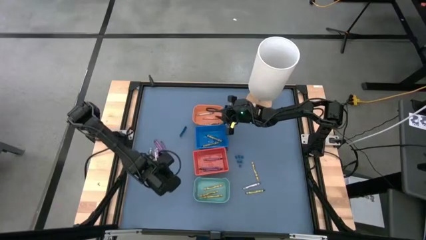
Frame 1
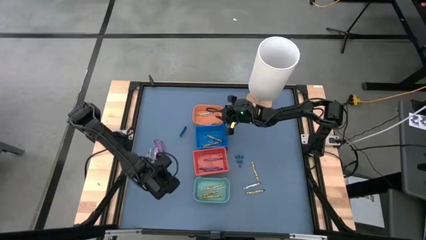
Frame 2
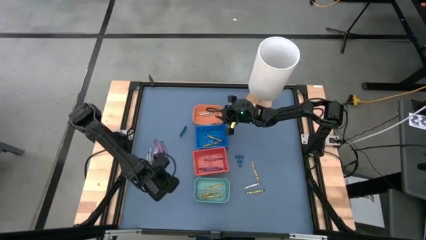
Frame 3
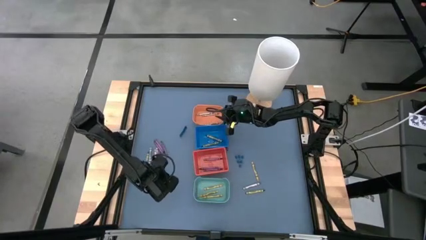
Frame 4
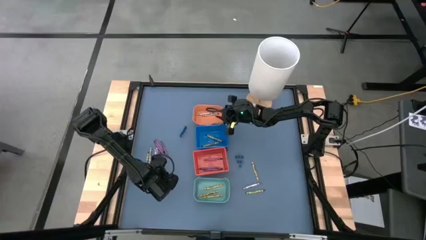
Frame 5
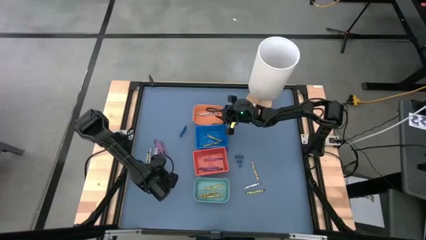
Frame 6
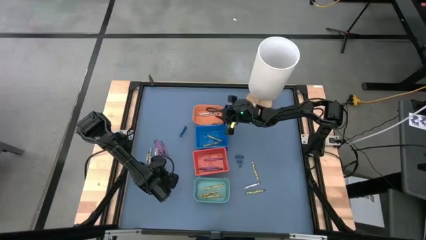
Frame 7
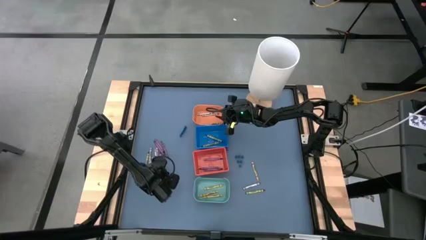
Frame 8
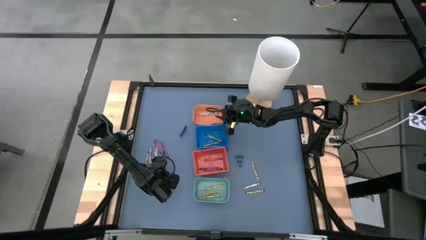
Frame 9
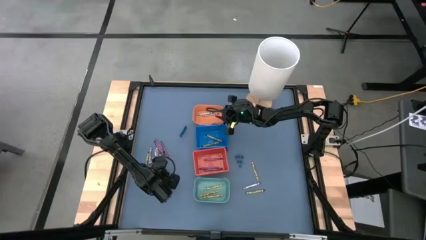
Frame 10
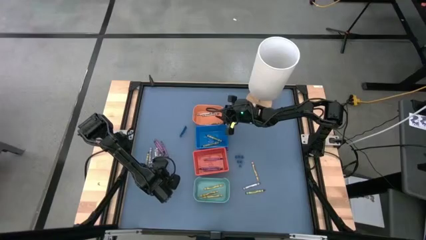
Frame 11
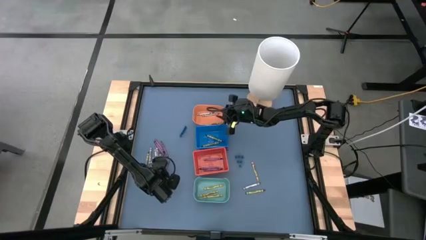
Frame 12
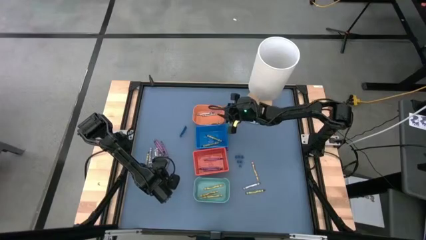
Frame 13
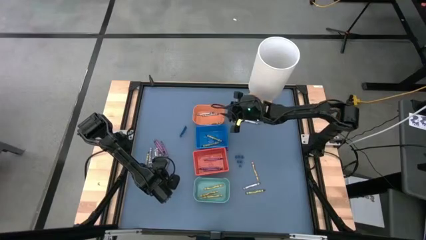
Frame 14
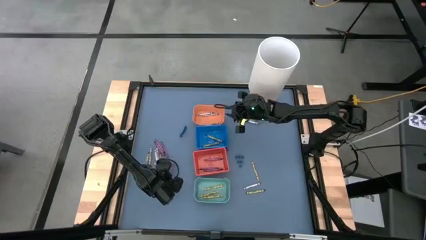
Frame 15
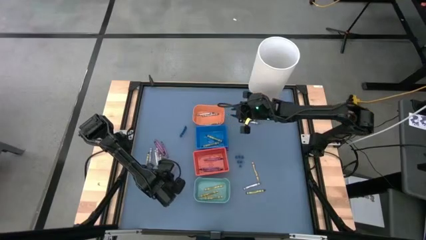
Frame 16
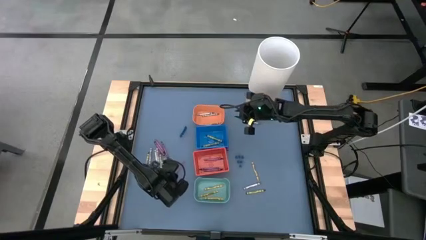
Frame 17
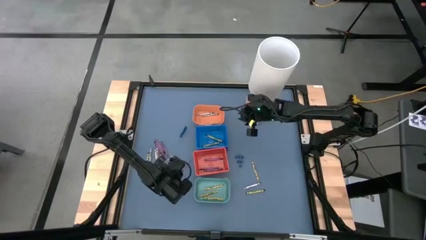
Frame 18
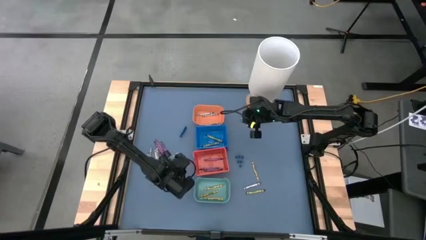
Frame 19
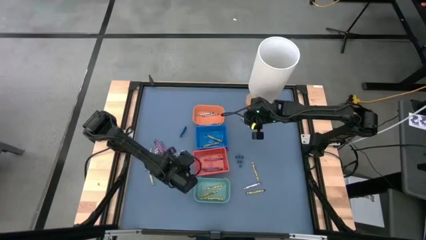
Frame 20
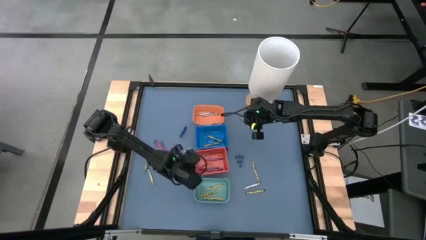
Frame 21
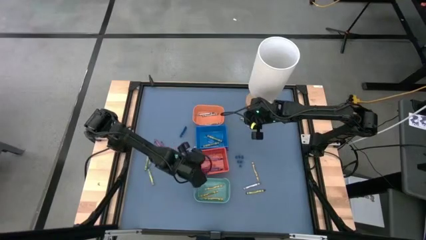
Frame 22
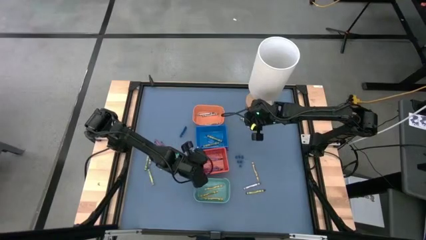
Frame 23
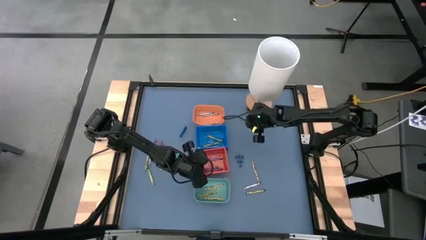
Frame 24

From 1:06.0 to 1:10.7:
Task: Sort crayons
Put the purple crayon into the red bin

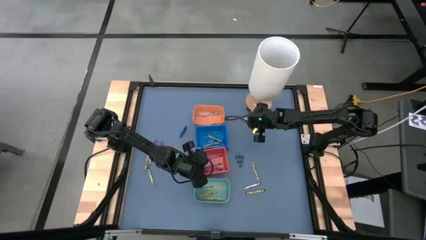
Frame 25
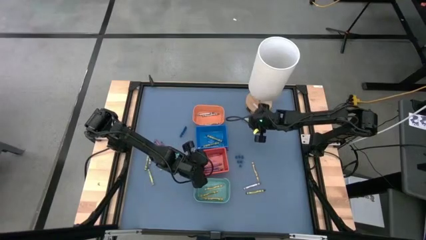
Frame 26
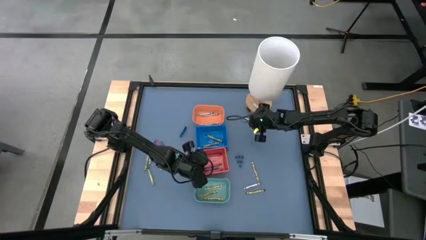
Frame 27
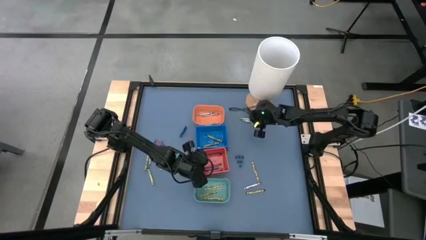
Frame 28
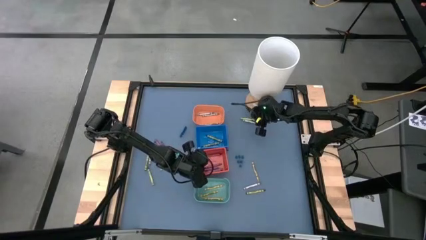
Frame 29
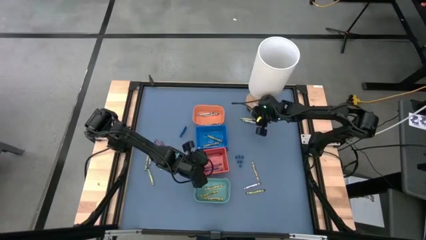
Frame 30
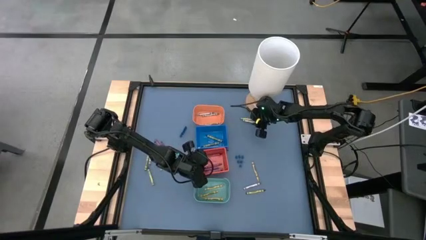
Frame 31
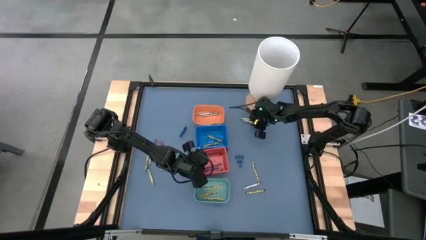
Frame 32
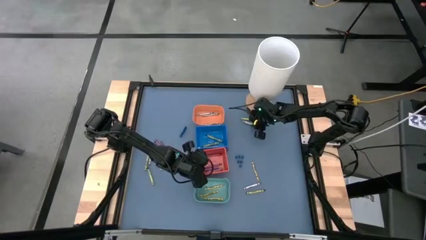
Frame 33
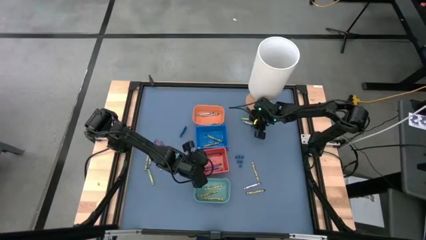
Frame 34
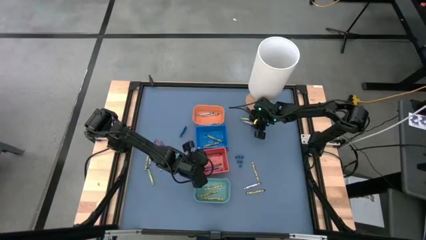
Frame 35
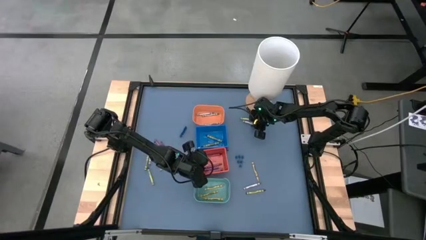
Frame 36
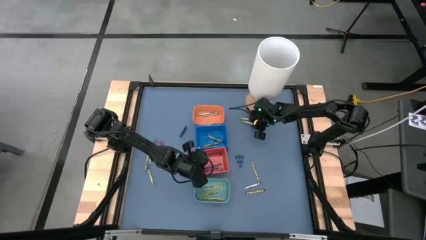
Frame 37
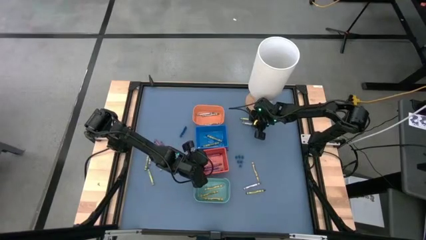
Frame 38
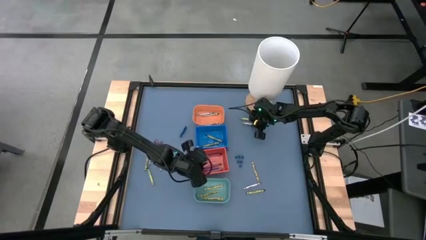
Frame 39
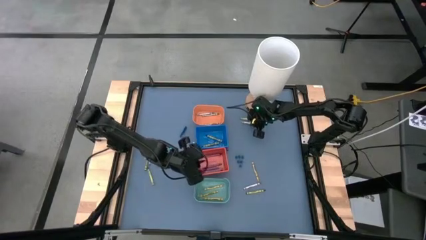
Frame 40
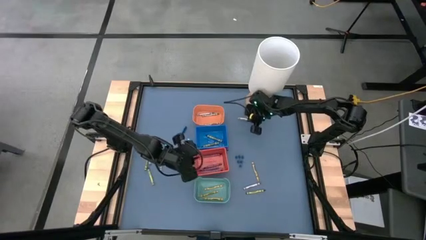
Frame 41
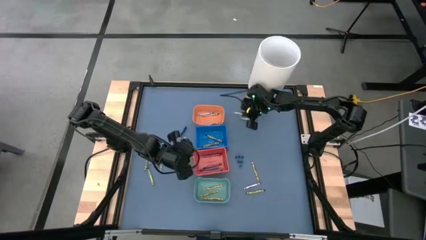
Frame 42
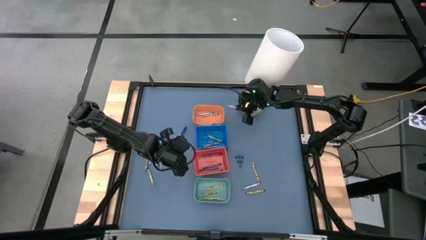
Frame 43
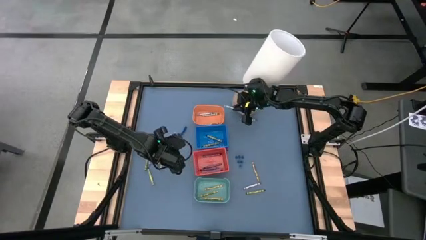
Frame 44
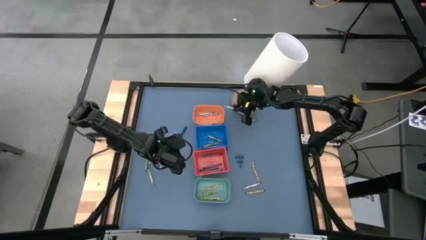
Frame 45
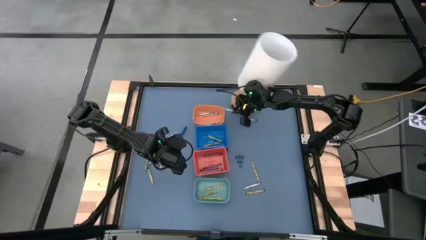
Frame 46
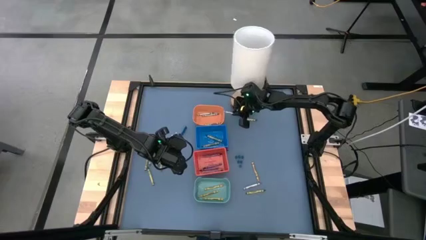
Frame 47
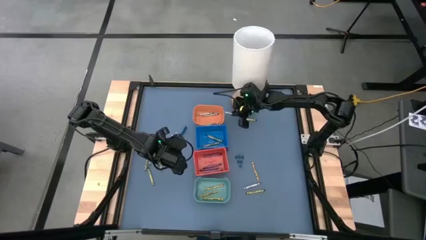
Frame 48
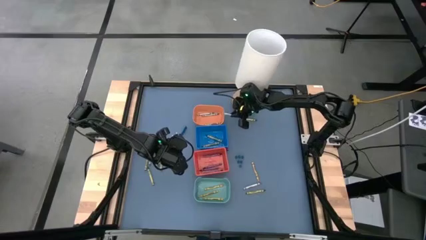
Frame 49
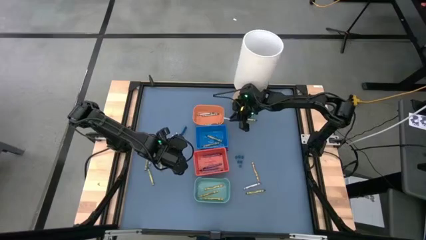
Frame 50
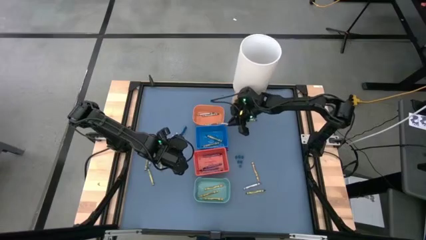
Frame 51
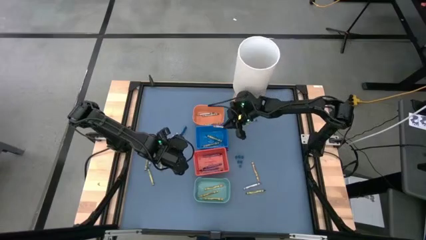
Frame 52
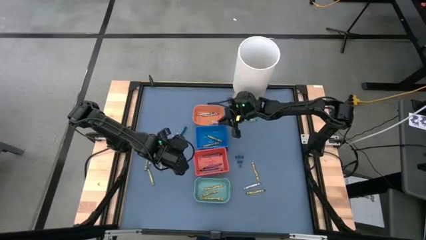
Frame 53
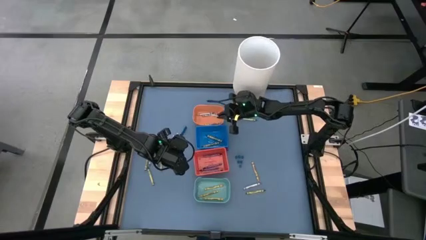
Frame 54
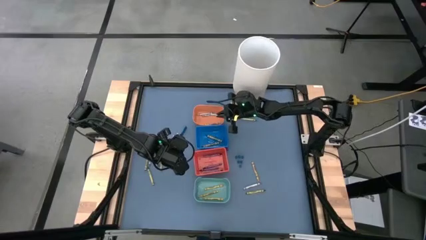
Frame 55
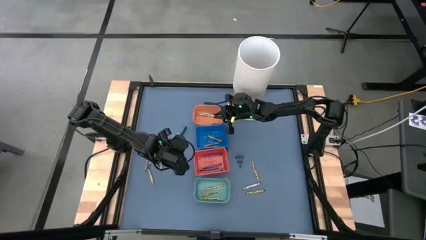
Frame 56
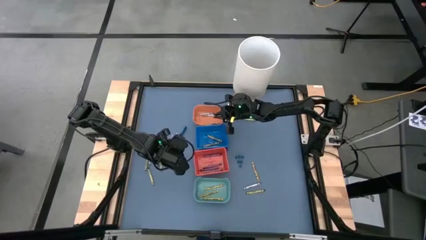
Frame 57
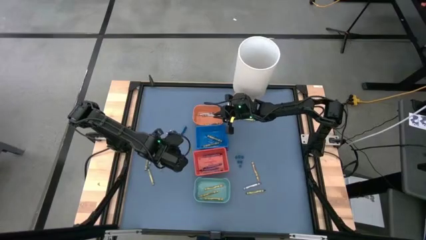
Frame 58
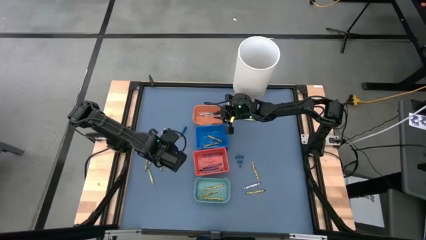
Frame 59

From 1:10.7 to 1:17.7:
Put the gray crayon into the orange bin

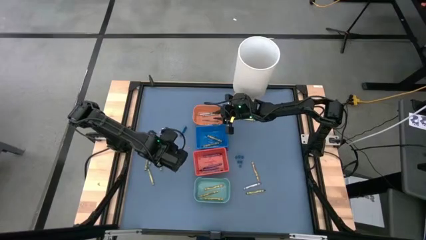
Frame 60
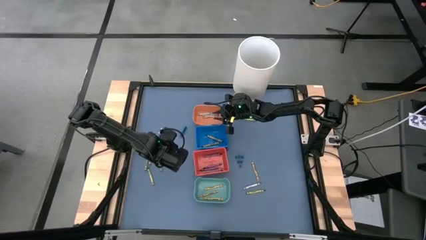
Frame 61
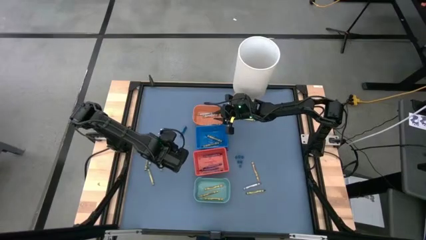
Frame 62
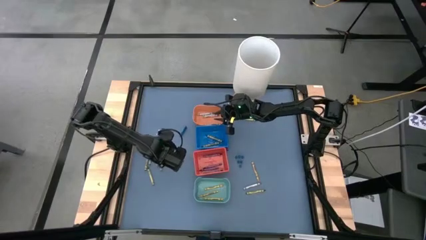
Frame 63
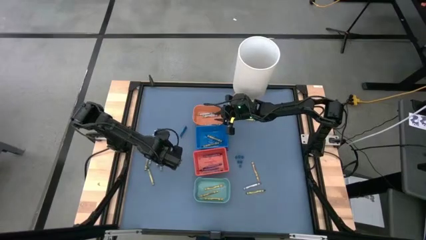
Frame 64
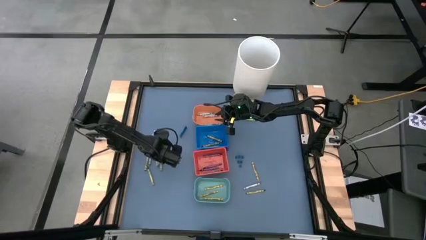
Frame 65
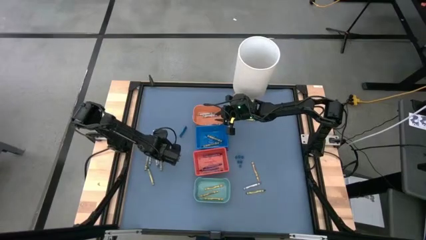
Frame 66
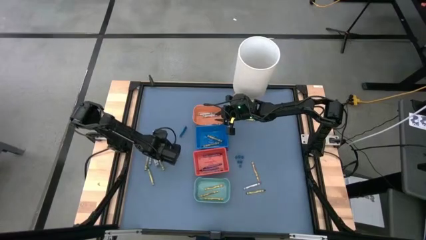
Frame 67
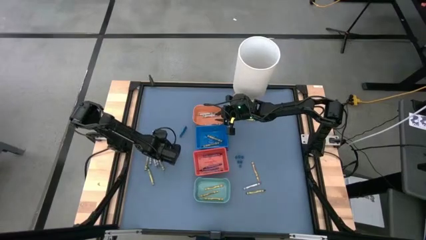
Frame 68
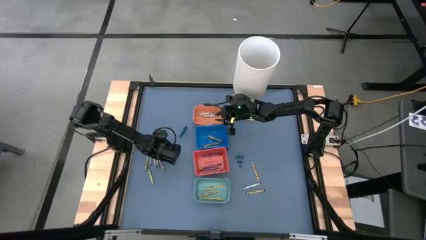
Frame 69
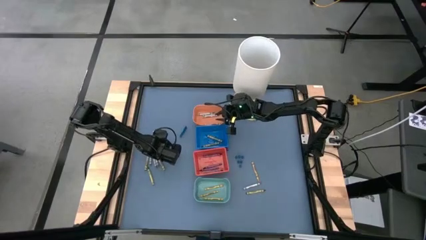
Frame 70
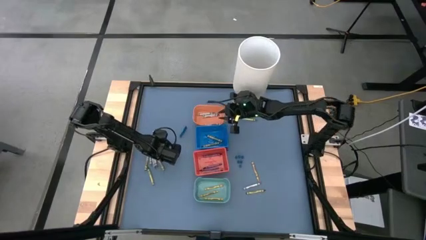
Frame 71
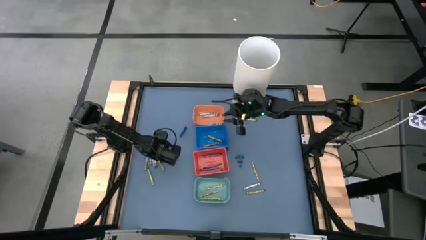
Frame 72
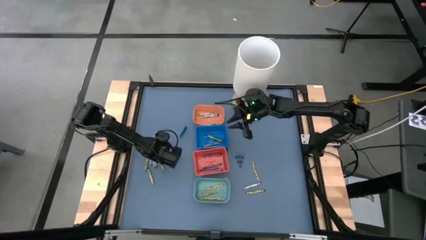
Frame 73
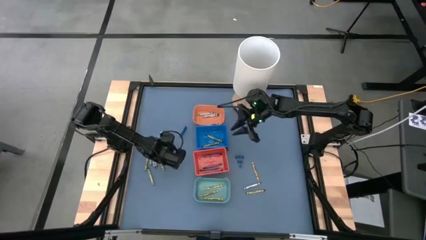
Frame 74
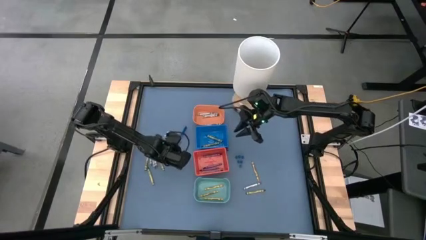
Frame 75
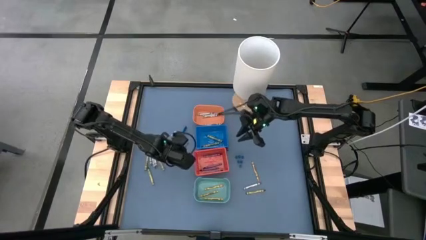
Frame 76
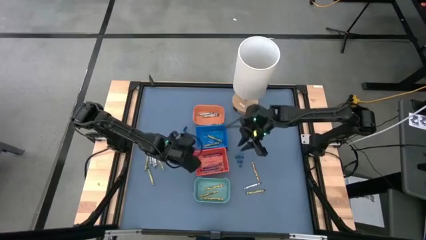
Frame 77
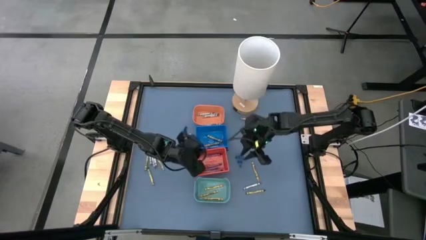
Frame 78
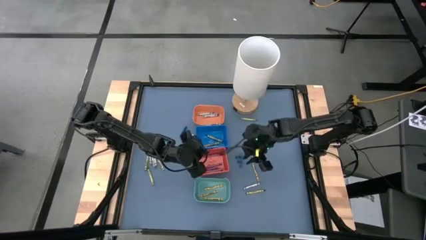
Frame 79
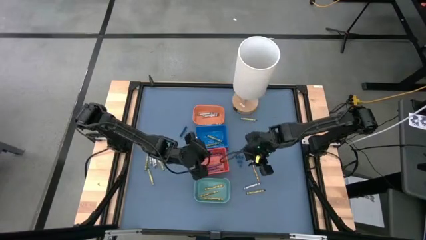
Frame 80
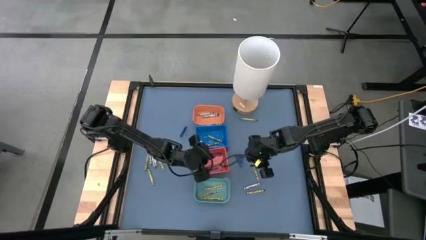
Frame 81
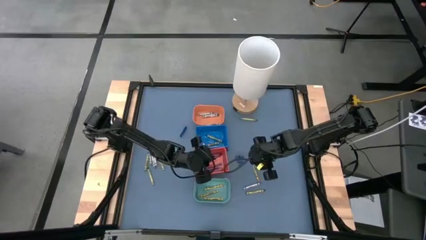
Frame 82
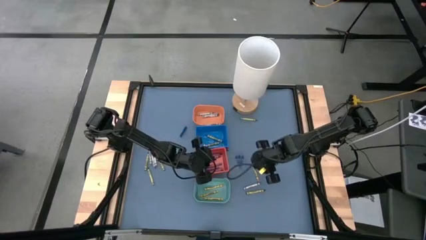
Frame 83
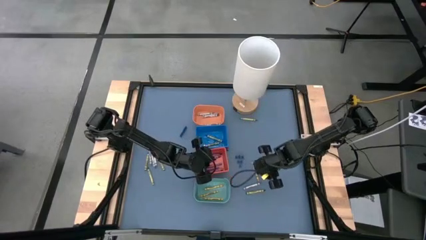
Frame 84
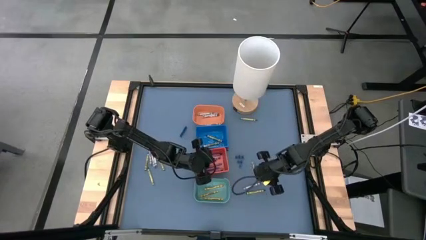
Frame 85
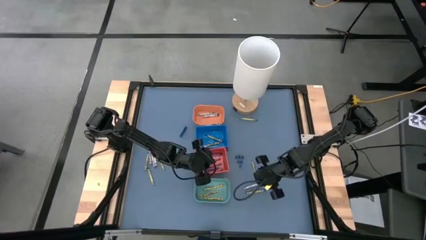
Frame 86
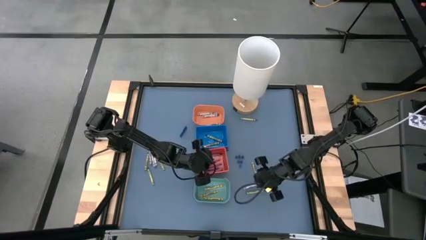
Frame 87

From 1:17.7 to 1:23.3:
Put the purple crayon into the red bin
